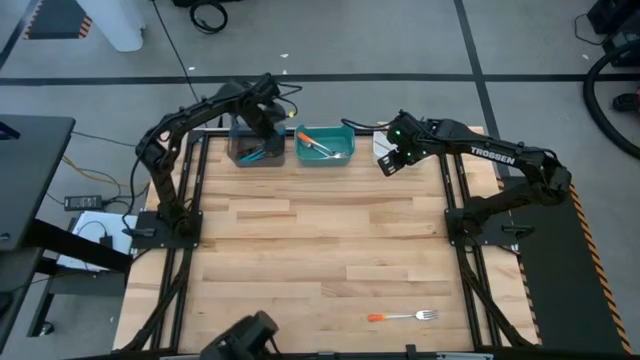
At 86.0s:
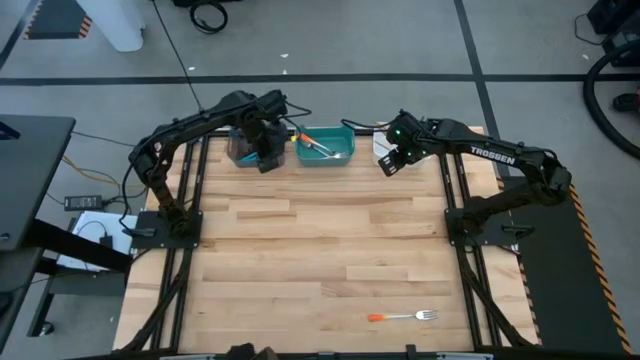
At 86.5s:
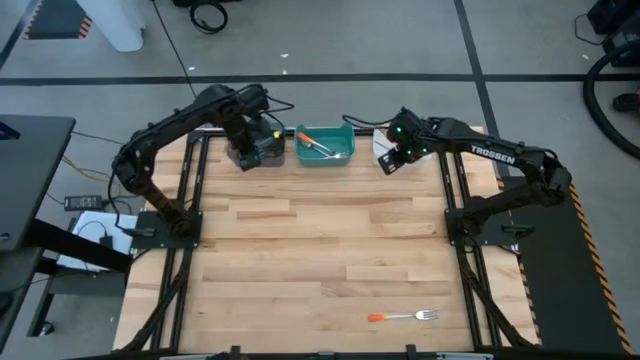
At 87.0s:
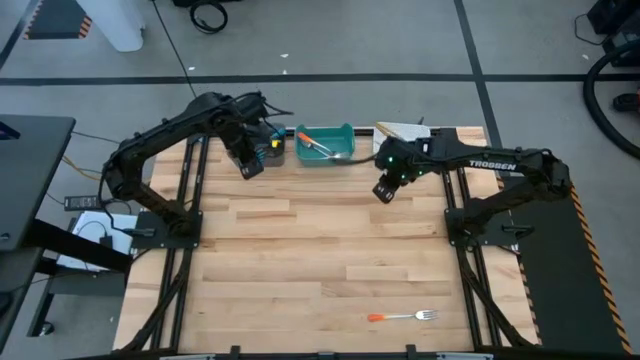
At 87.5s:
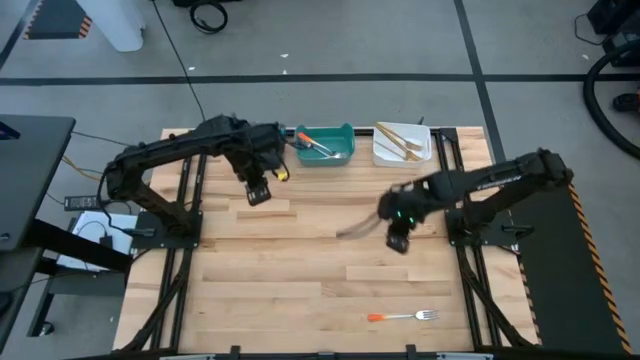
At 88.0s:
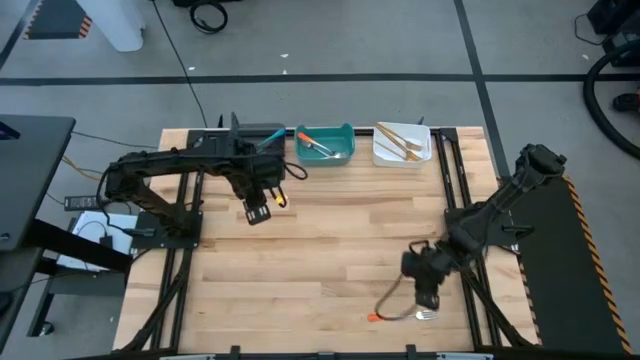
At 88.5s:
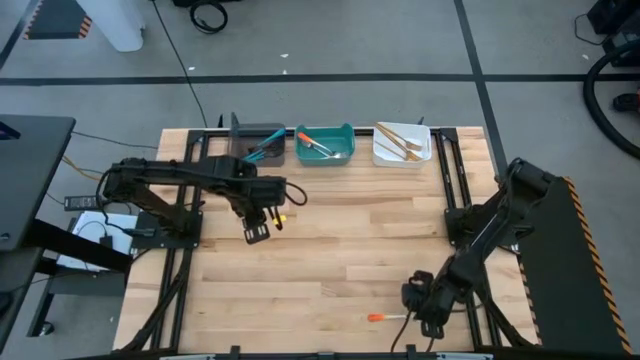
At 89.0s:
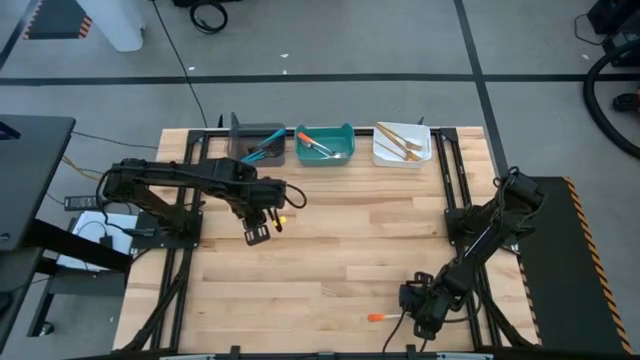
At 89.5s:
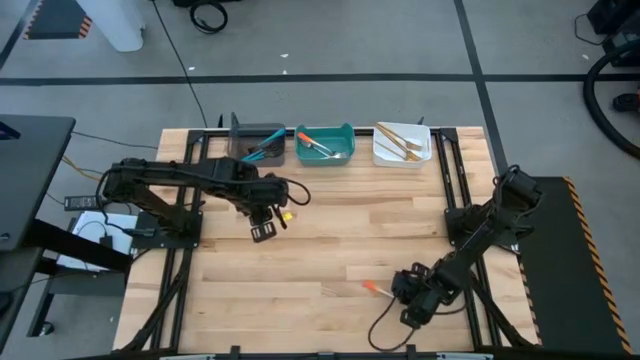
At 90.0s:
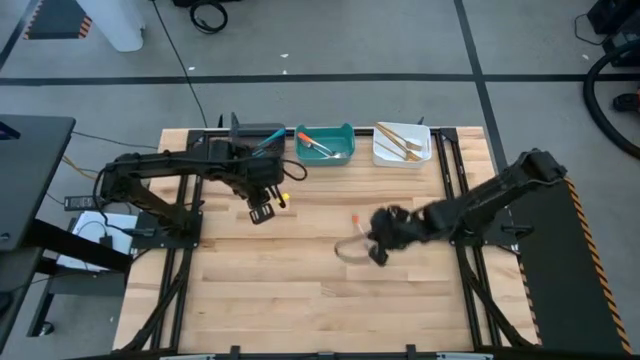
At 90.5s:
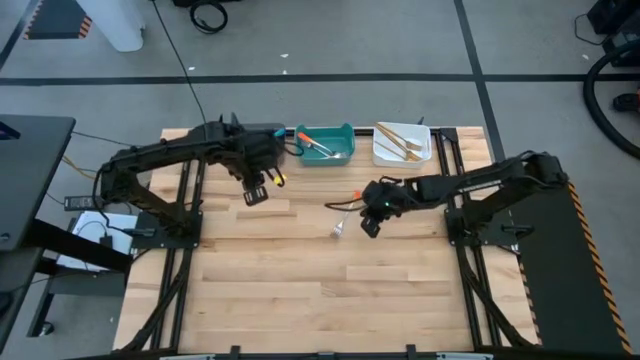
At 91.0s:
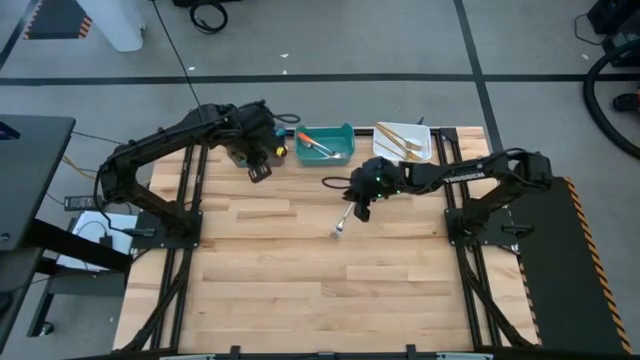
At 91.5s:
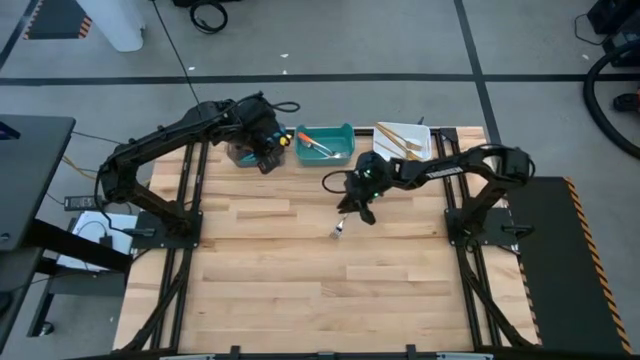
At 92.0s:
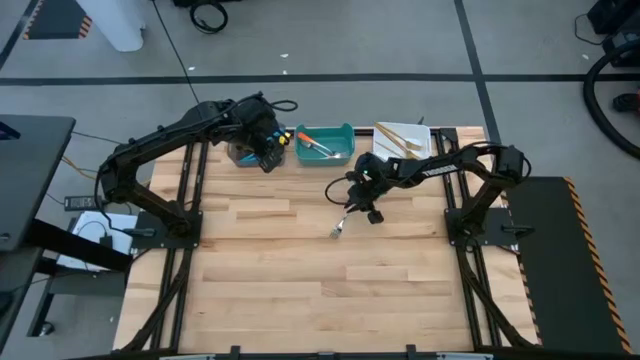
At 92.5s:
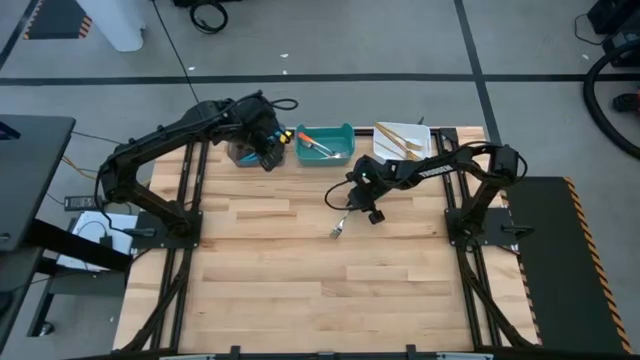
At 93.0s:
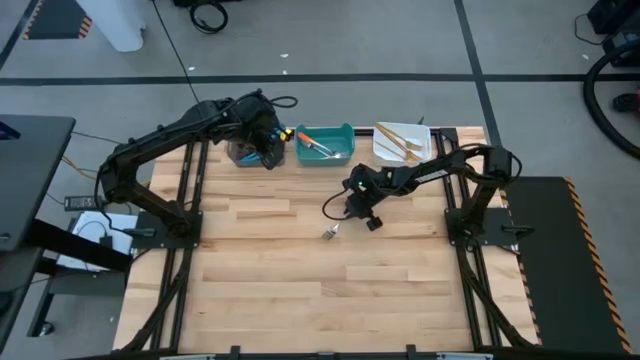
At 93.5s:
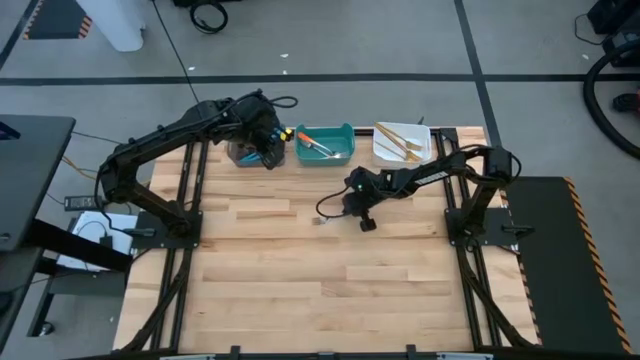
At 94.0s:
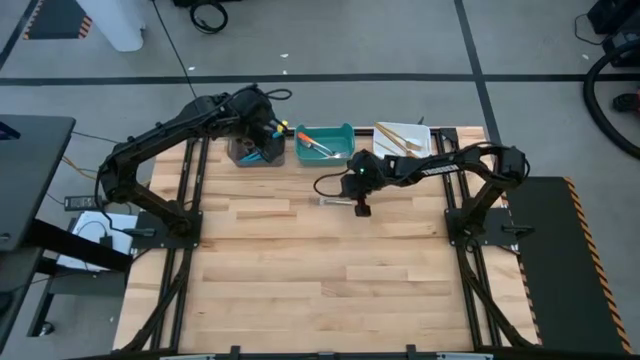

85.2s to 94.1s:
Task: Sort silverware by color (type)
Put the orange fork into the blue bin

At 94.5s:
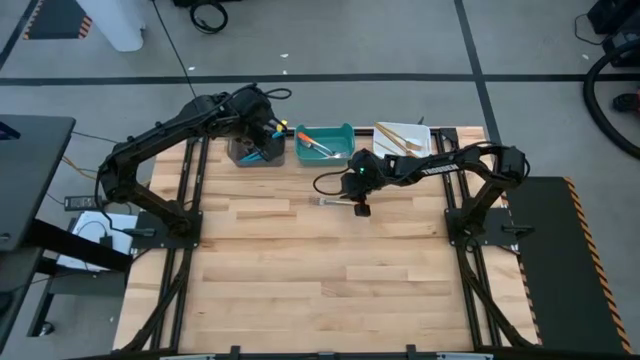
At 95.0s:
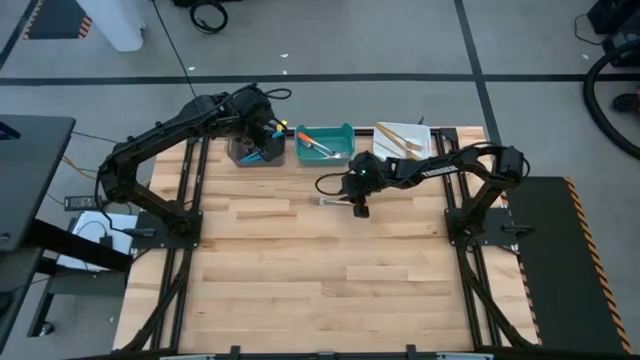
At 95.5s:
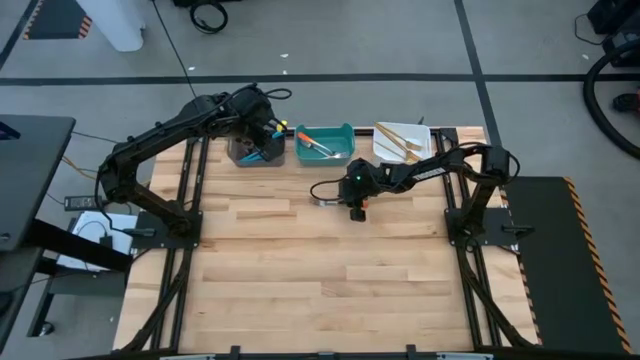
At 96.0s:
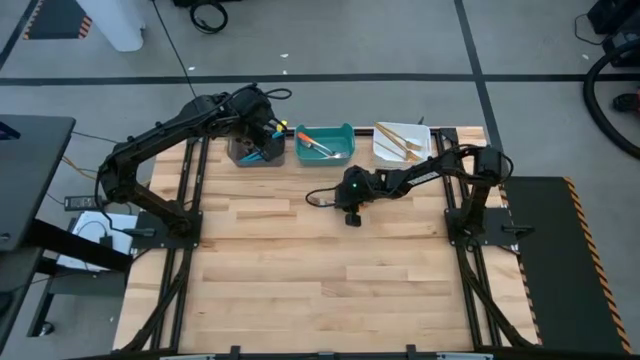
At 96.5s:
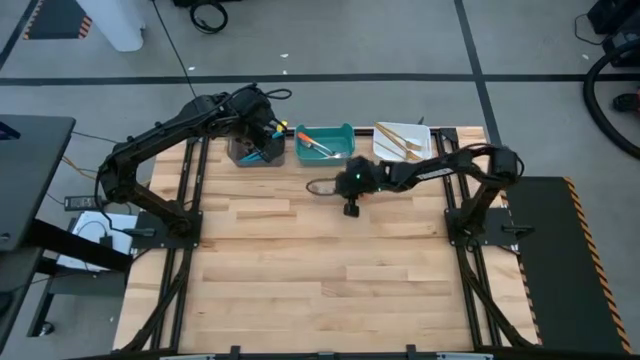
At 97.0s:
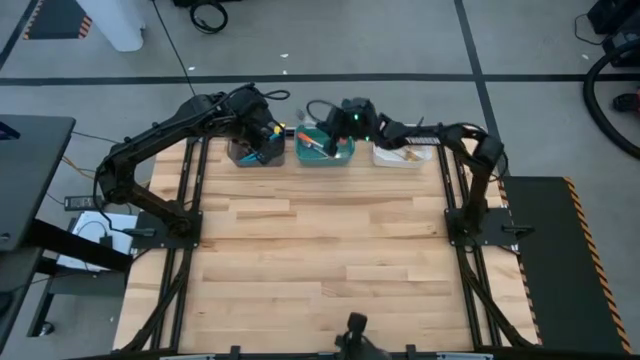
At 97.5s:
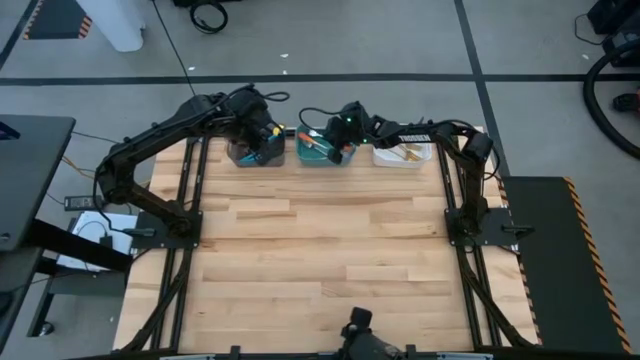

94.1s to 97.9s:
Put the orange fork into the blue bin

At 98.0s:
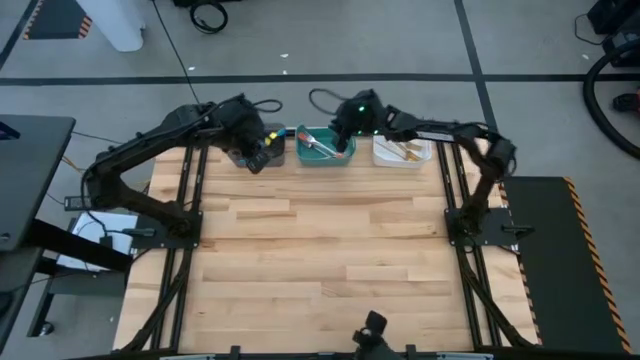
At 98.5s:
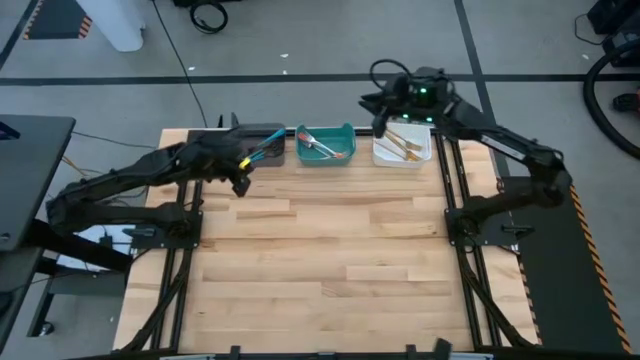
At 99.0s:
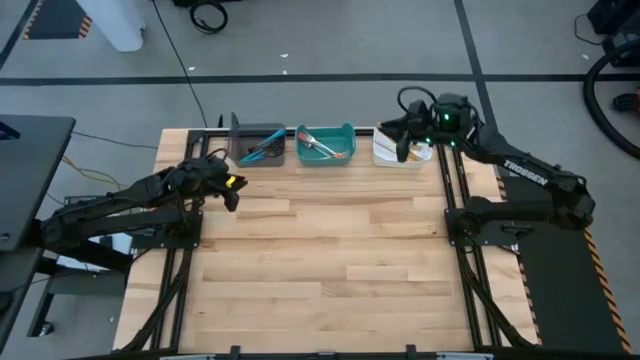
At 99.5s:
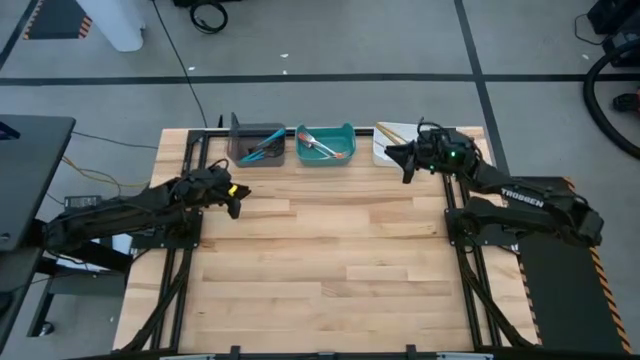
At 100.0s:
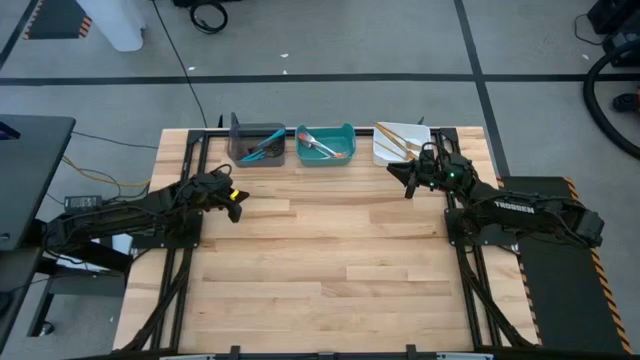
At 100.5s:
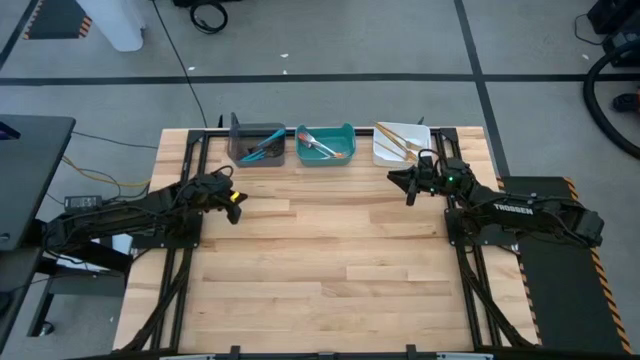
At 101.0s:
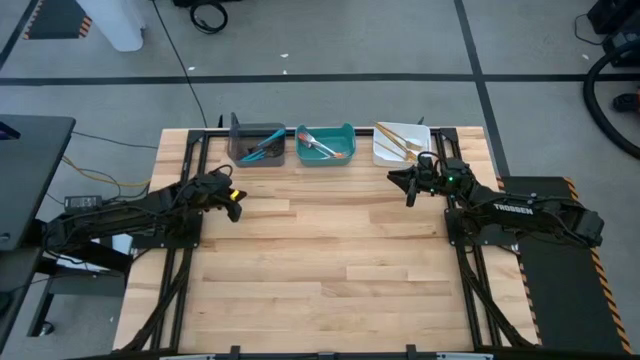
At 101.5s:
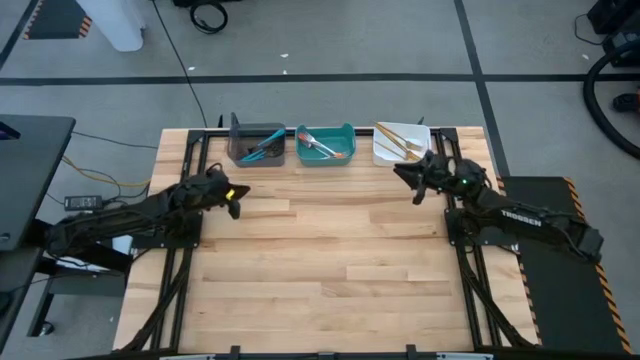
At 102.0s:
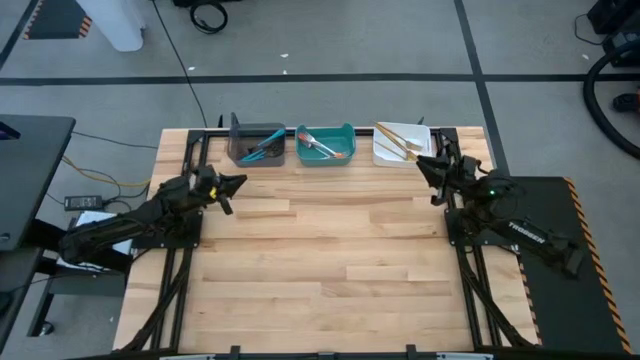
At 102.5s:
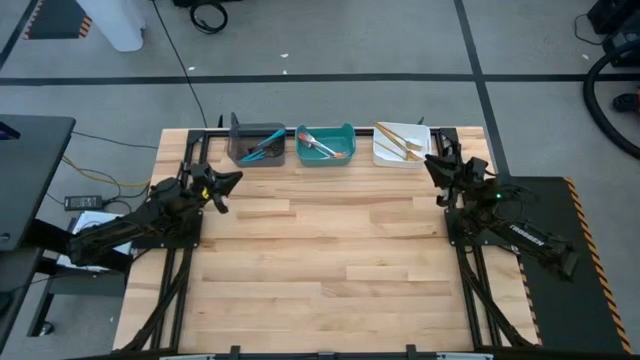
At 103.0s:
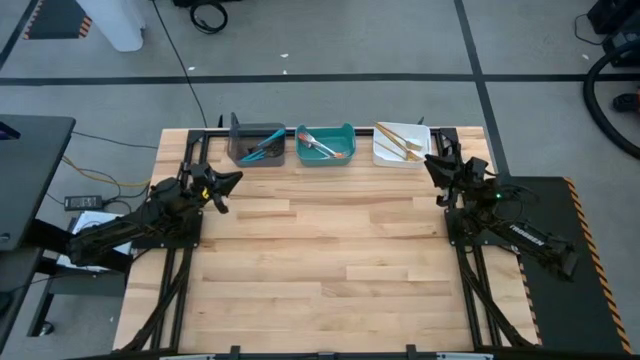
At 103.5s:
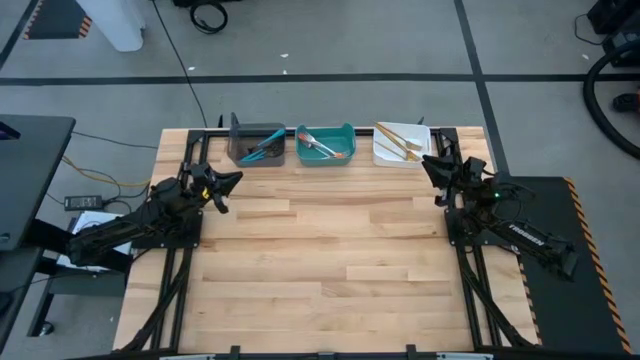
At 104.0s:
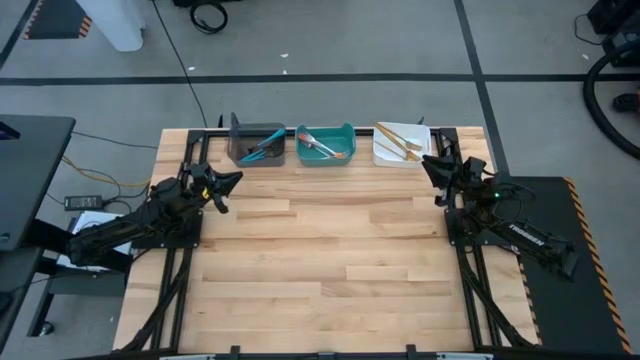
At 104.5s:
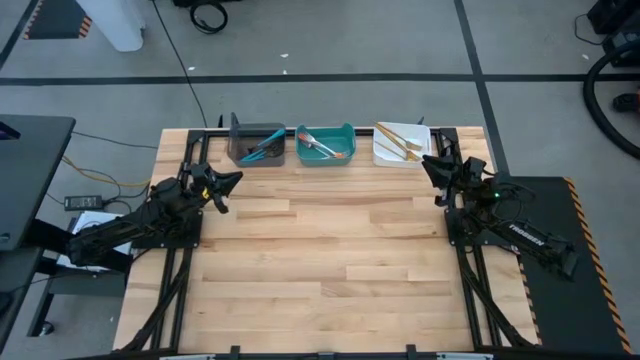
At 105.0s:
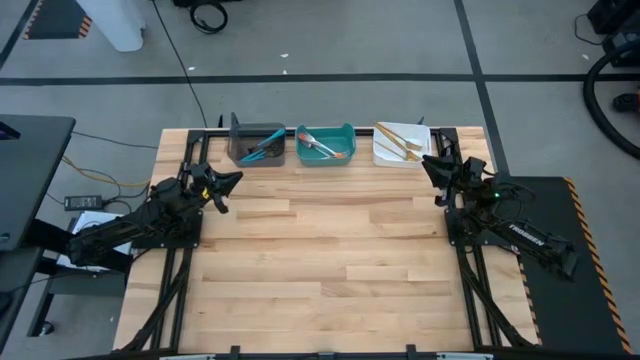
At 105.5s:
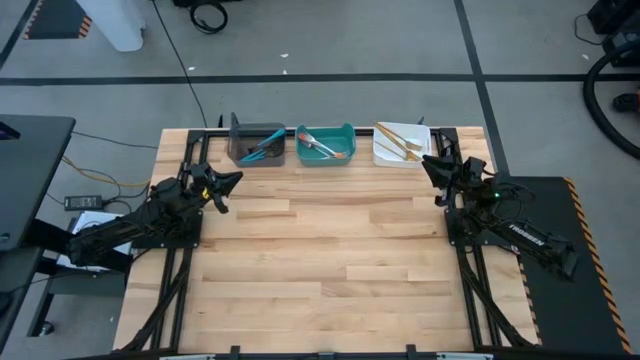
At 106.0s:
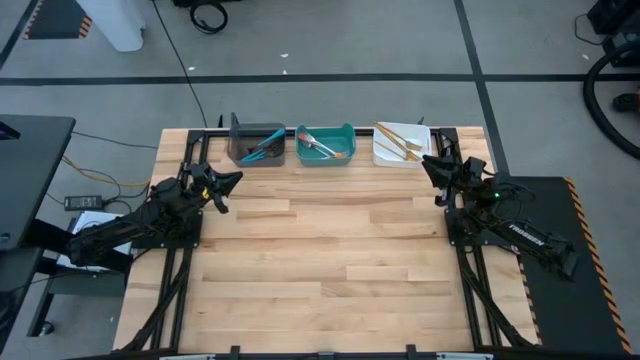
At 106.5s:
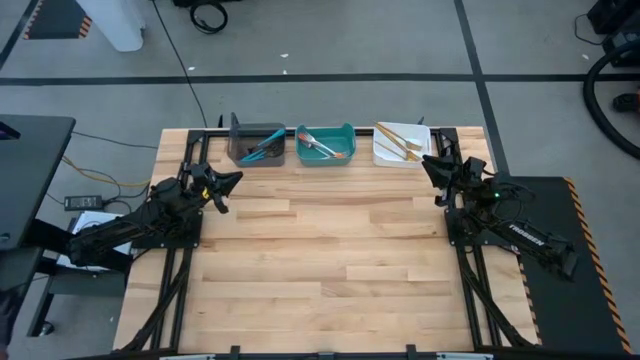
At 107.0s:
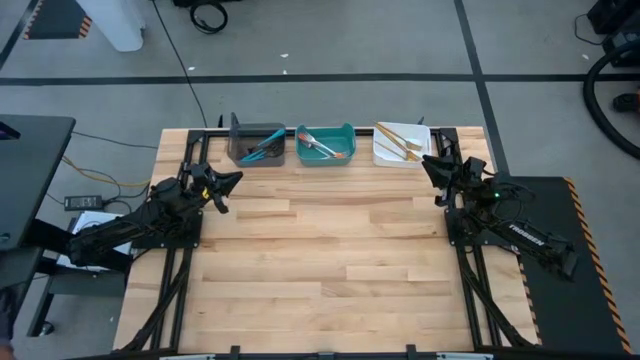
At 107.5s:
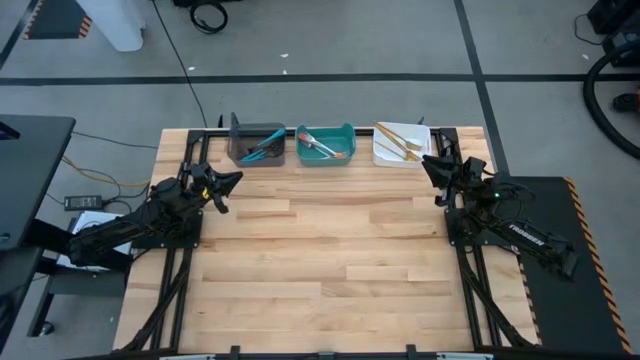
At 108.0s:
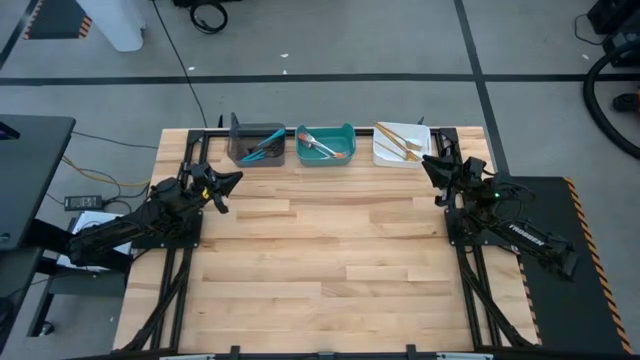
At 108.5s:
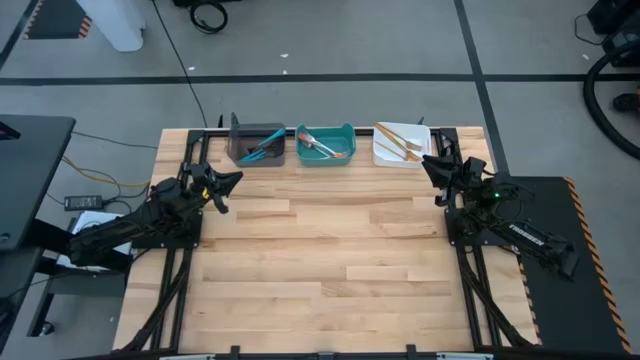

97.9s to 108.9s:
Return to Home Position
